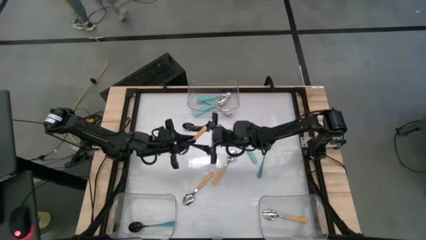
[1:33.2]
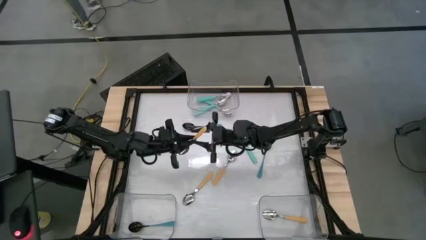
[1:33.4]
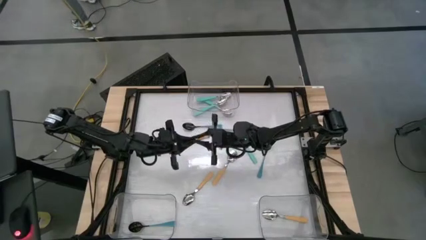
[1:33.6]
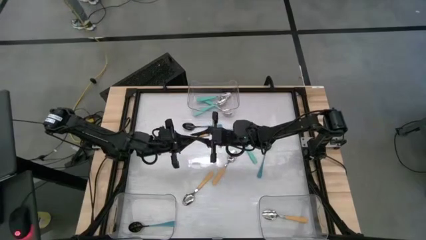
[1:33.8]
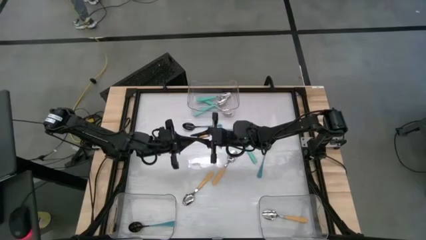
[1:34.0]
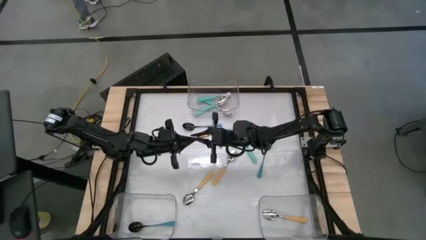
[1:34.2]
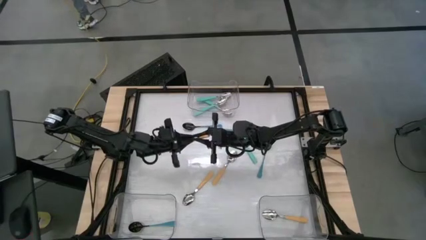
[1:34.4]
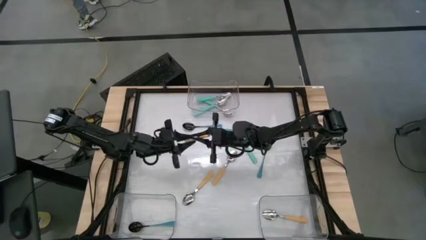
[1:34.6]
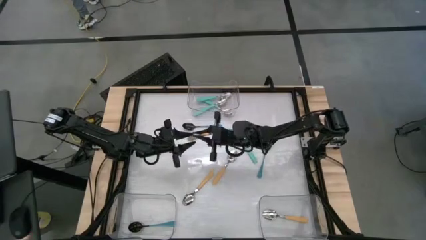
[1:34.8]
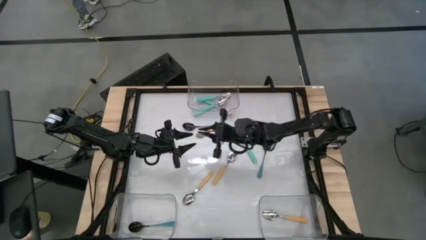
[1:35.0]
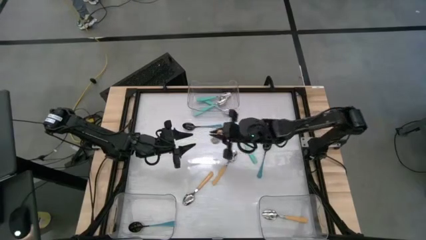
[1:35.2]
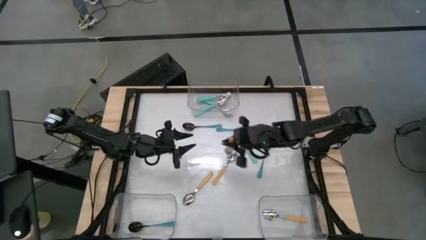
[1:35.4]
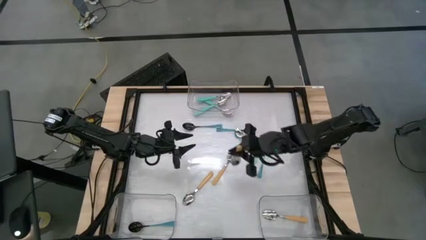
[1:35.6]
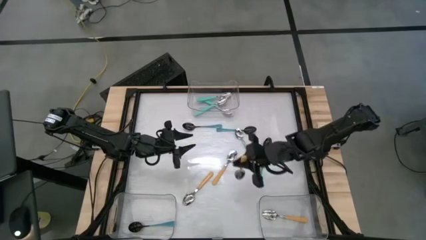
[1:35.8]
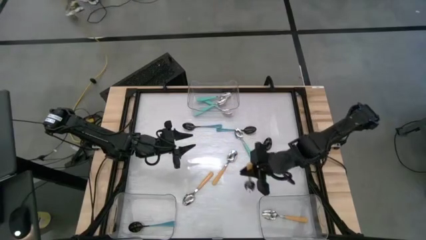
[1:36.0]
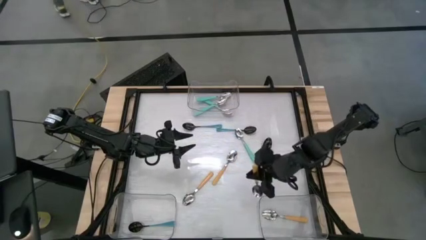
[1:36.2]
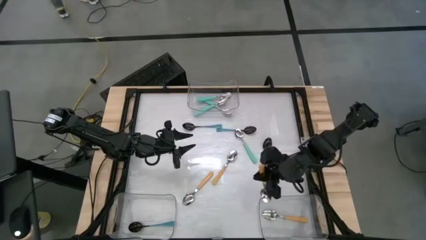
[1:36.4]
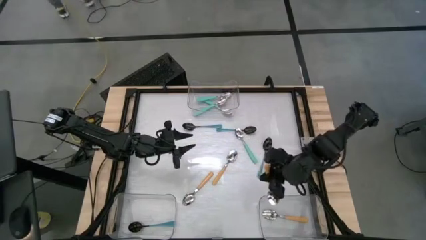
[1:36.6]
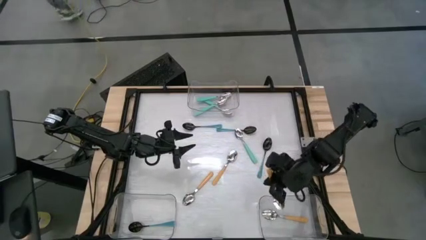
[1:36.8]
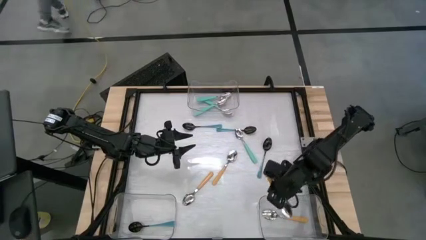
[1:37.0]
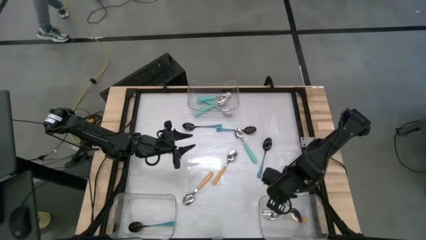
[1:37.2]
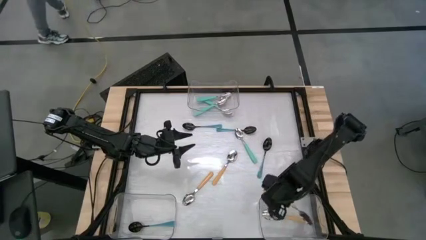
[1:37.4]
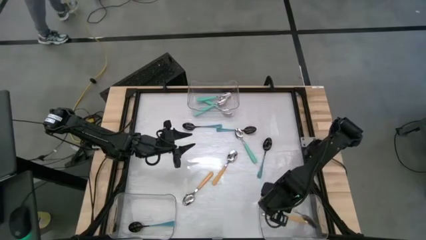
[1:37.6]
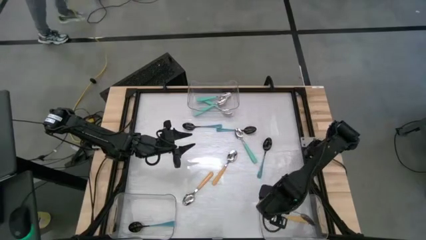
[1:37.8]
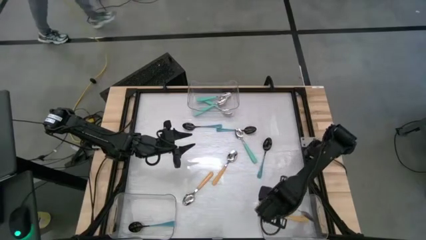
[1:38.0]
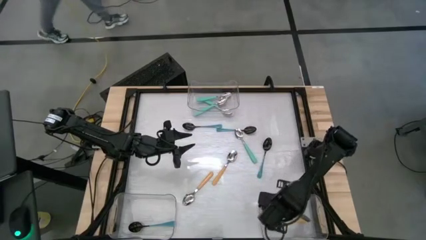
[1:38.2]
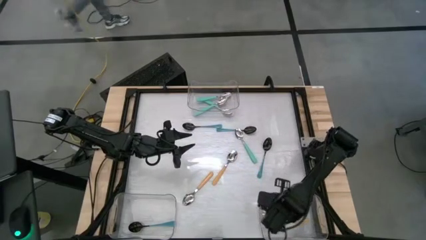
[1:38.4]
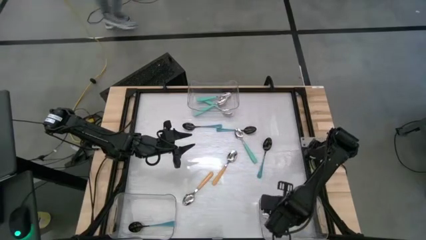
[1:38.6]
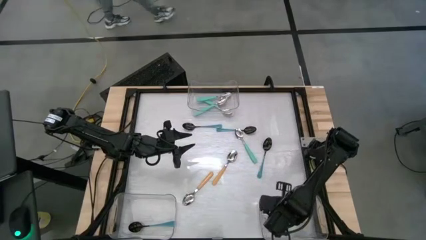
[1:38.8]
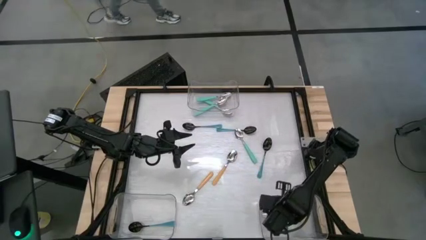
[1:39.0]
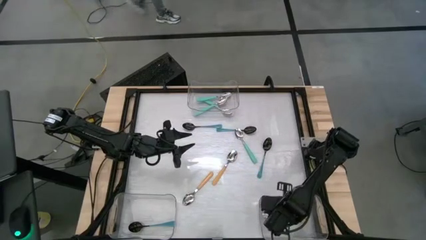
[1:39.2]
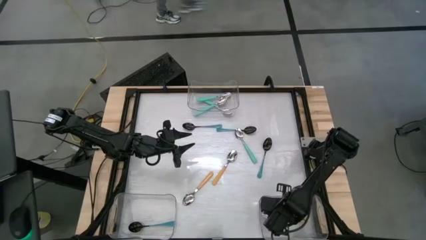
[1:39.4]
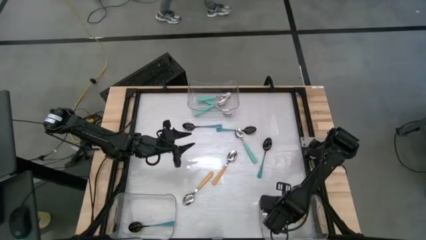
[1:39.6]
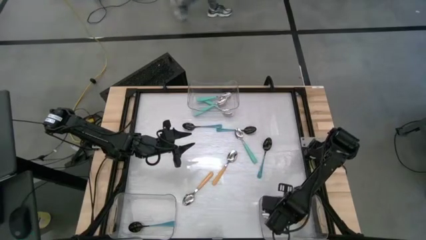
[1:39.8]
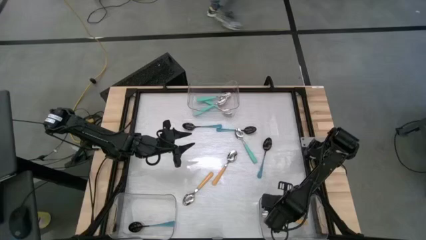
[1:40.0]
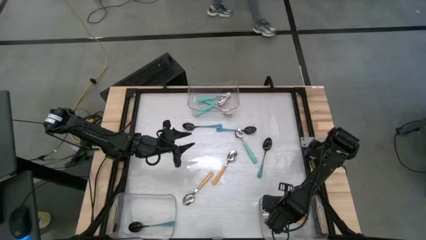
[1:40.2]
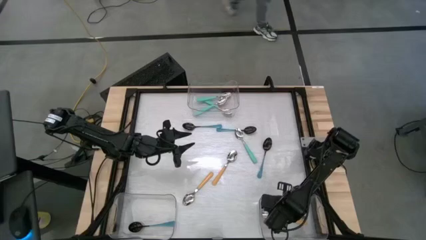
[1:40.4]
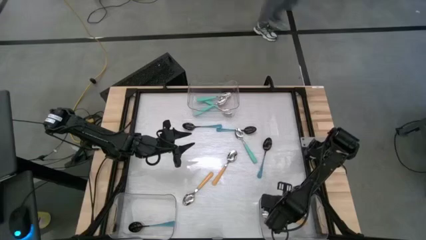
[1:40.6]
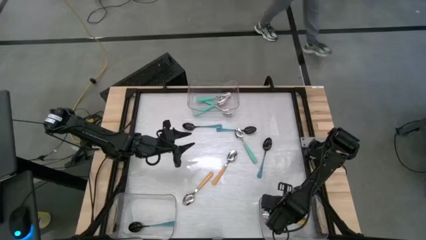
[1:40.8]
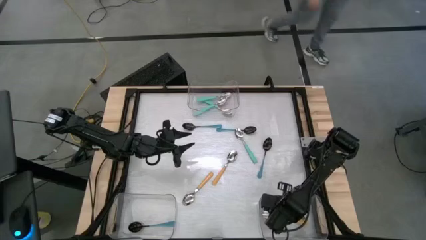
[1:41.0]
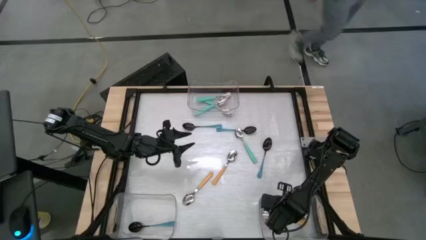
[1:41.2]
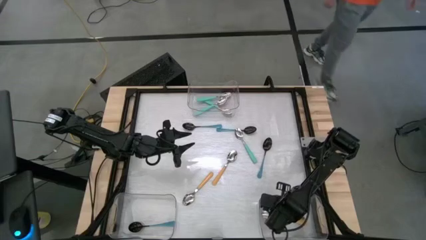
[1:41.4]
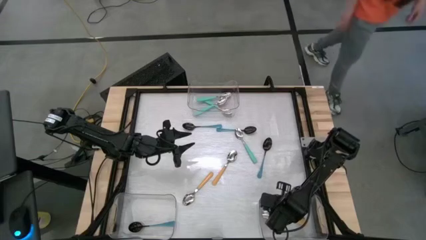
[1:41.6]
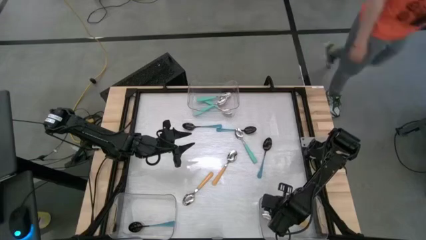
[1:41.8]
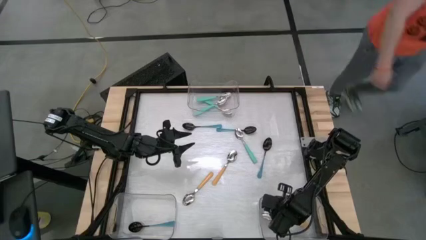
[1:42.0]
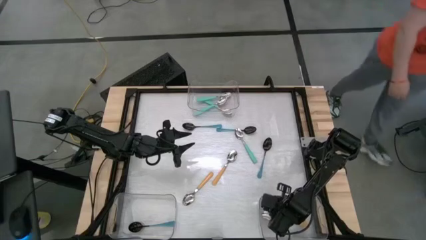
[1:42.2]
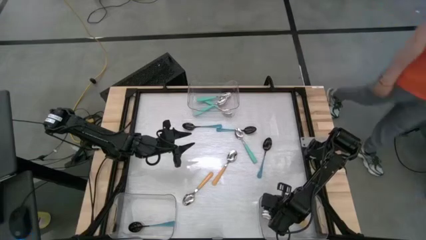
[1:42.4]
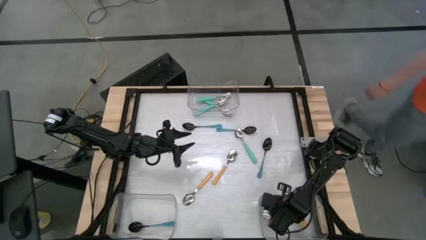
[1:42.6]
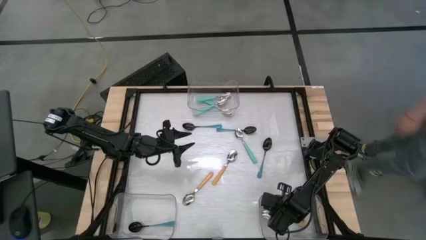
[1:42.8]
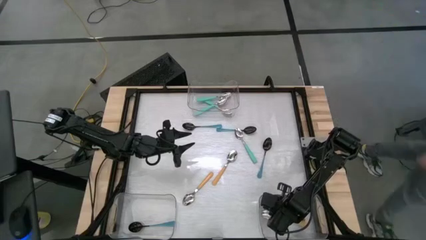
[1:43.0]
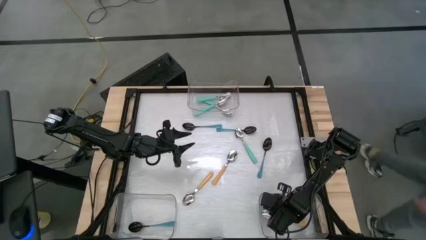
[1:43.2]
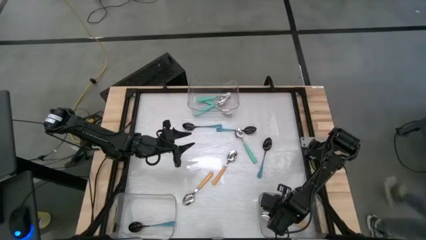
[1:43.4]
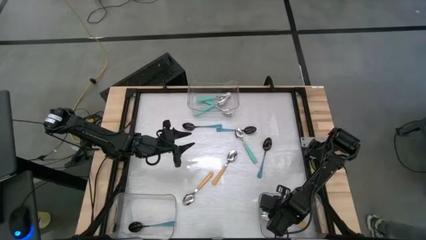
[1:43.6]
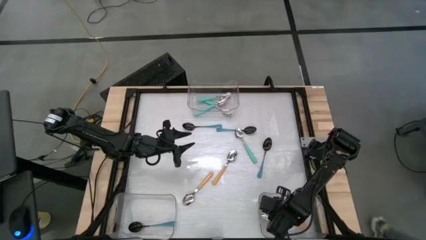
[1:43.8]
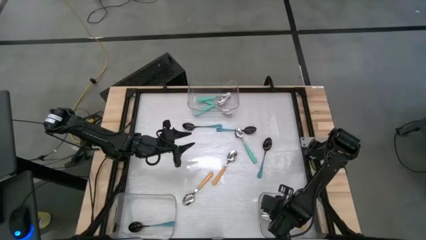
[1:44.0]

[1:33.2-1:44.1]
Task: Sort silverware by color (type)
Put the left orange spoon into the bottom right transparent bin
